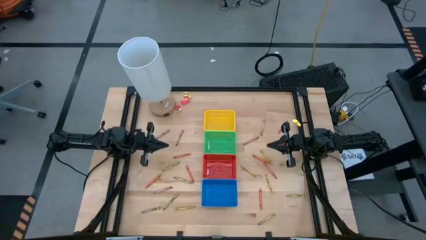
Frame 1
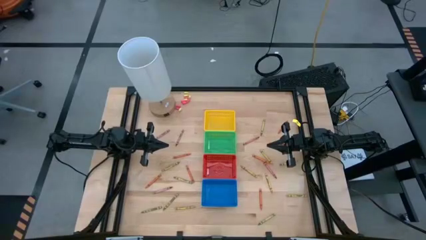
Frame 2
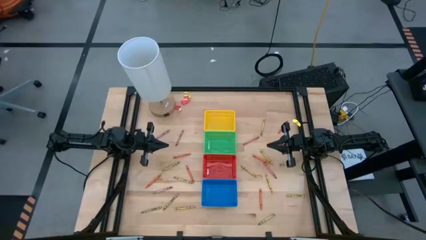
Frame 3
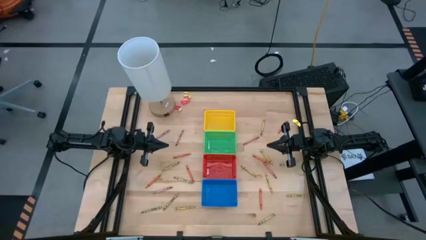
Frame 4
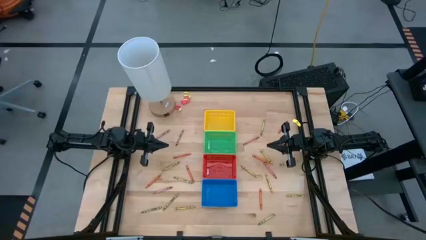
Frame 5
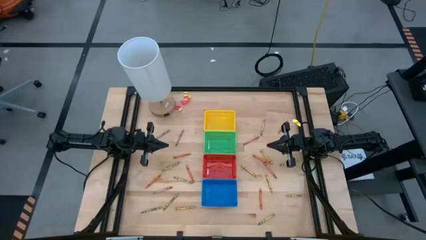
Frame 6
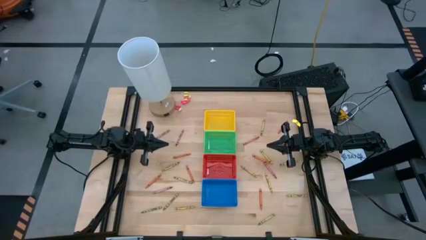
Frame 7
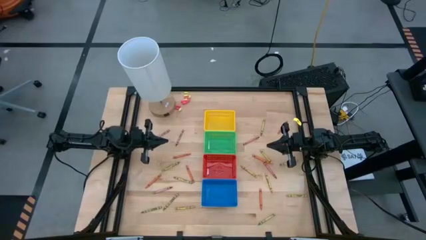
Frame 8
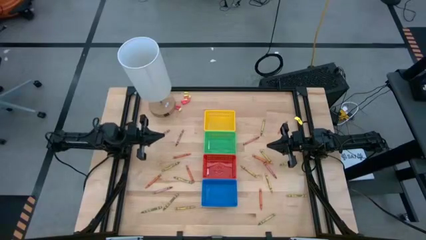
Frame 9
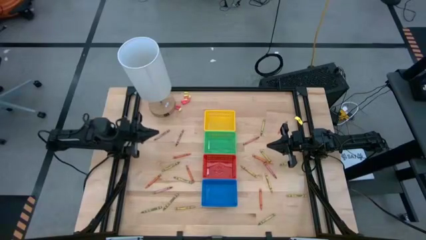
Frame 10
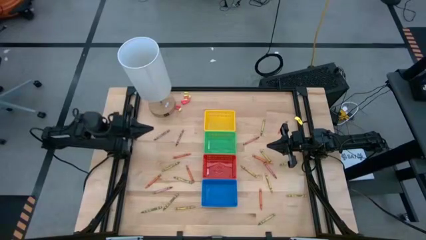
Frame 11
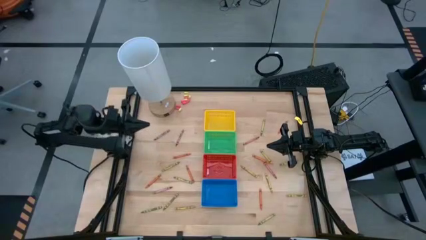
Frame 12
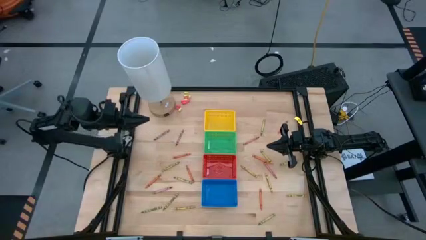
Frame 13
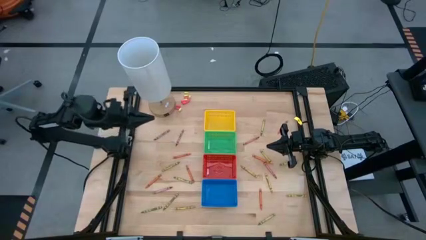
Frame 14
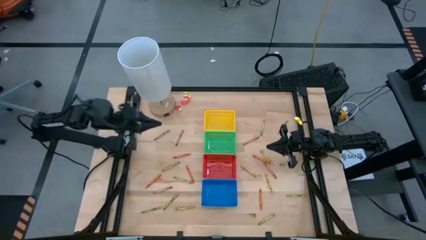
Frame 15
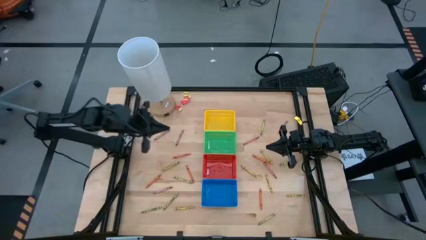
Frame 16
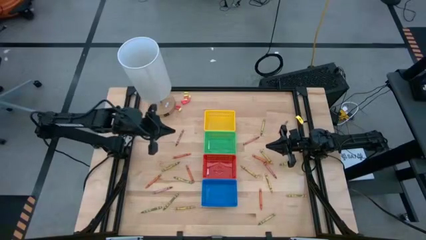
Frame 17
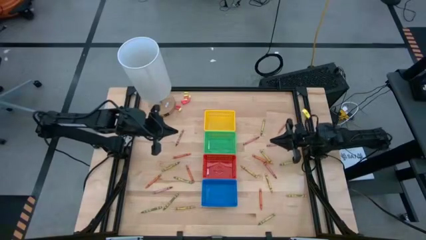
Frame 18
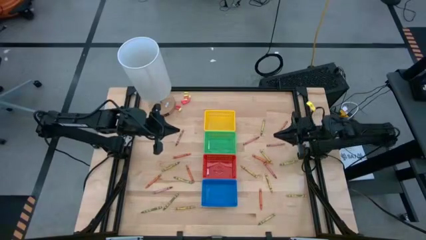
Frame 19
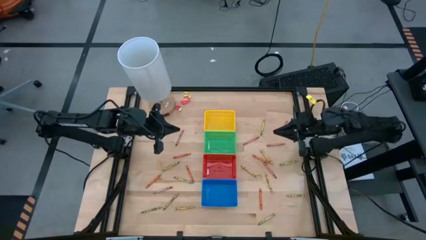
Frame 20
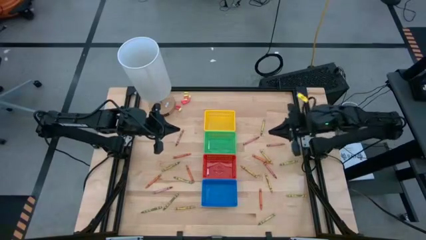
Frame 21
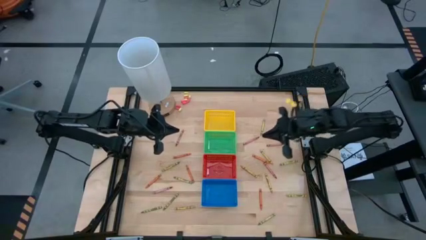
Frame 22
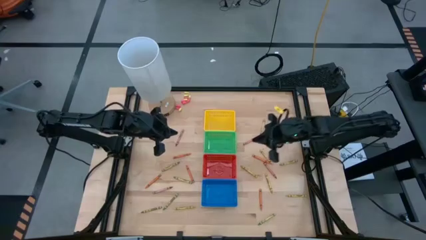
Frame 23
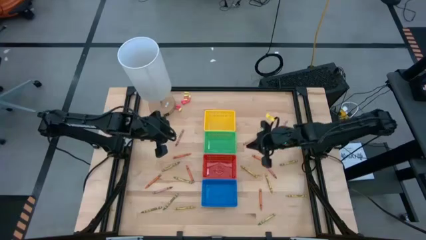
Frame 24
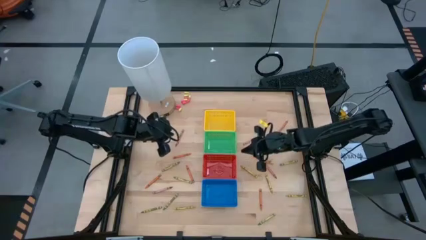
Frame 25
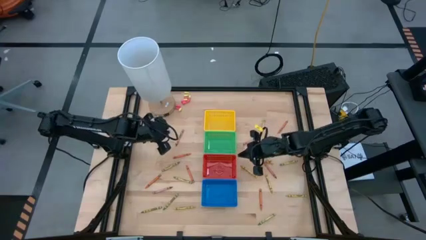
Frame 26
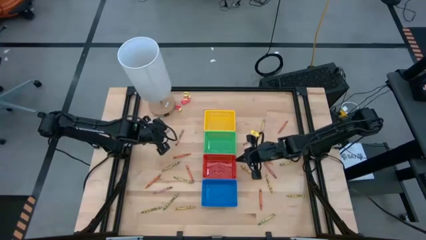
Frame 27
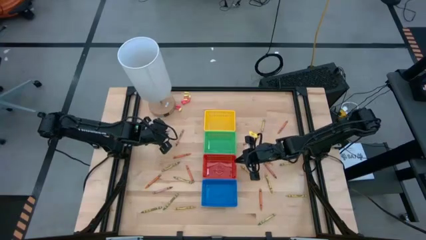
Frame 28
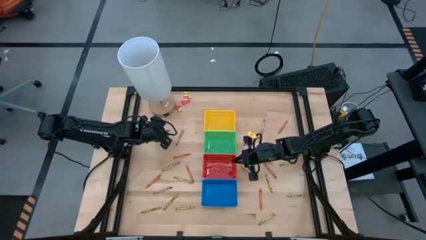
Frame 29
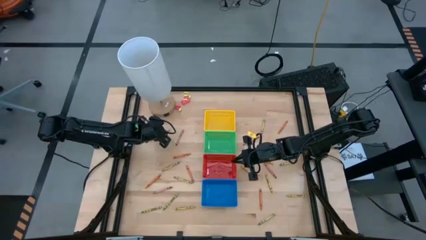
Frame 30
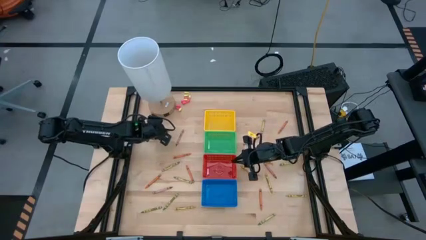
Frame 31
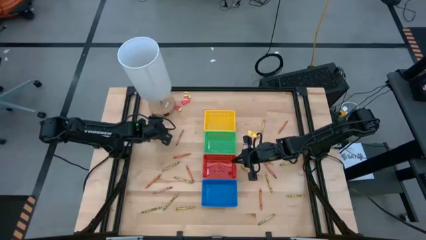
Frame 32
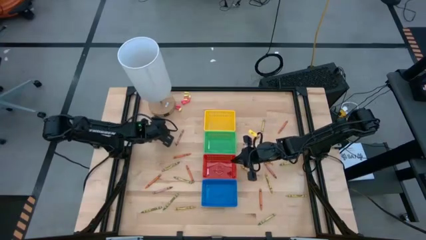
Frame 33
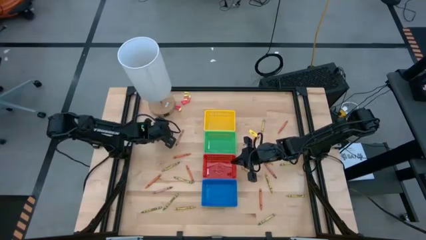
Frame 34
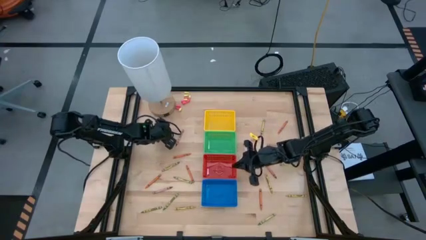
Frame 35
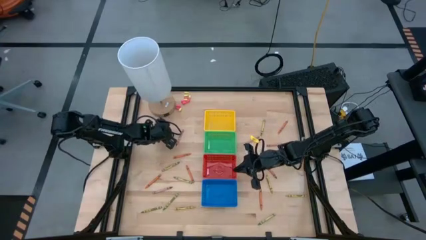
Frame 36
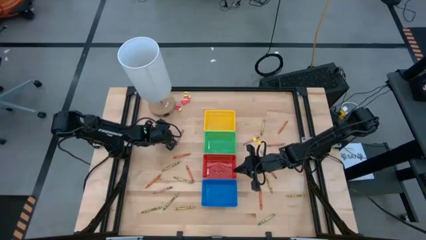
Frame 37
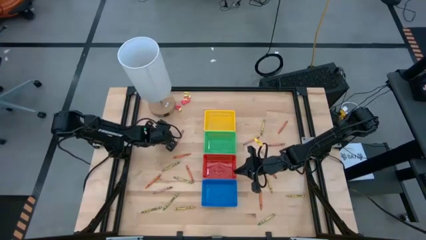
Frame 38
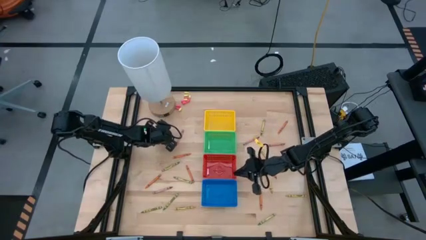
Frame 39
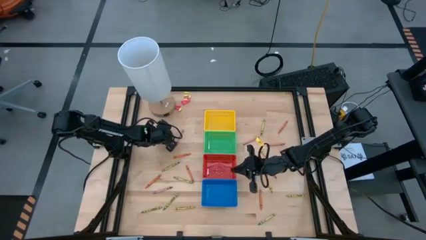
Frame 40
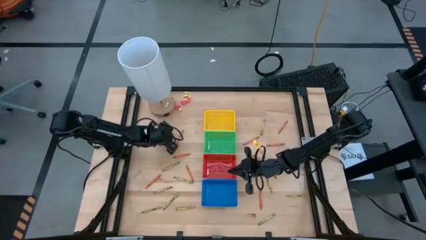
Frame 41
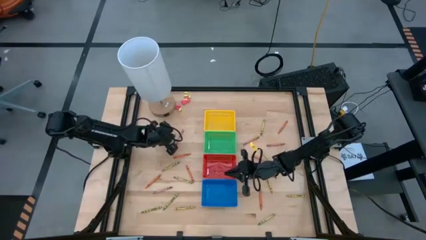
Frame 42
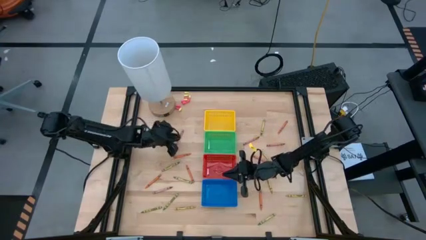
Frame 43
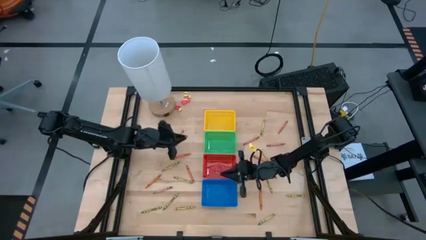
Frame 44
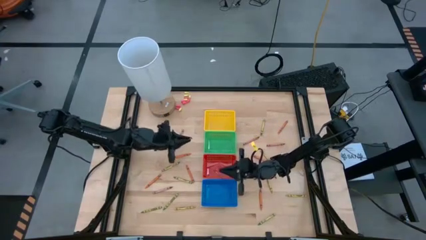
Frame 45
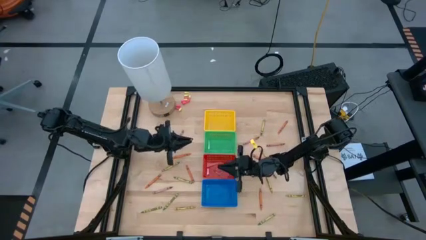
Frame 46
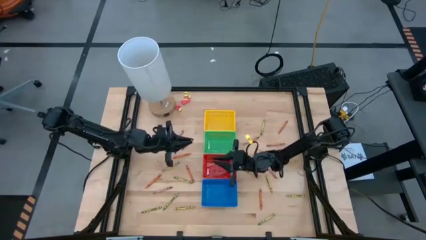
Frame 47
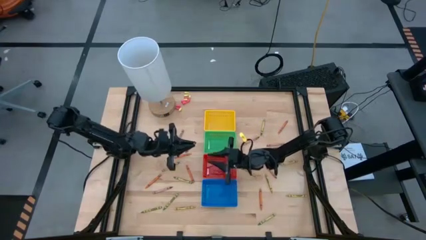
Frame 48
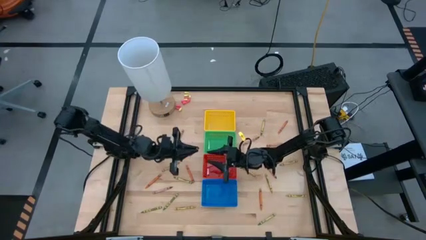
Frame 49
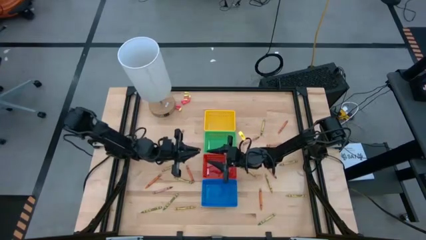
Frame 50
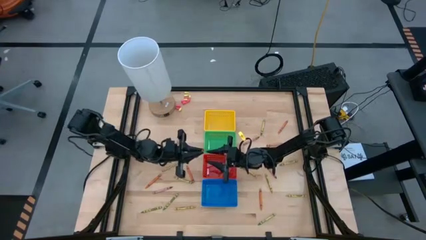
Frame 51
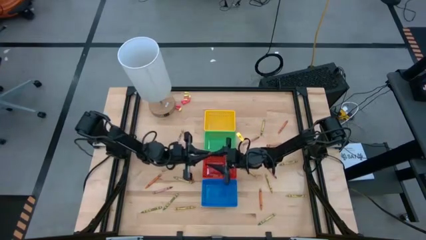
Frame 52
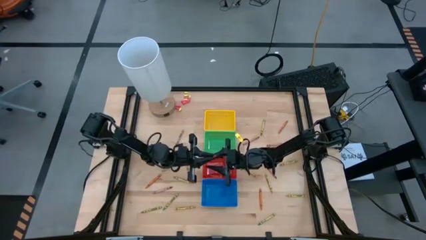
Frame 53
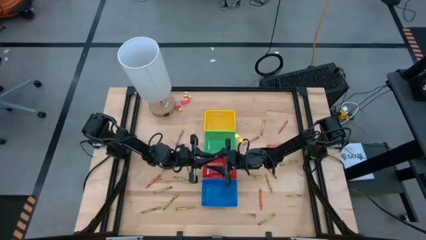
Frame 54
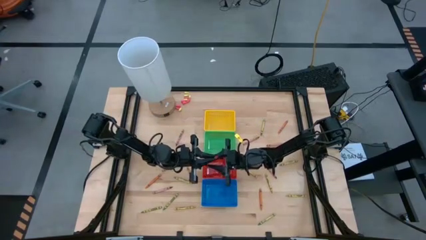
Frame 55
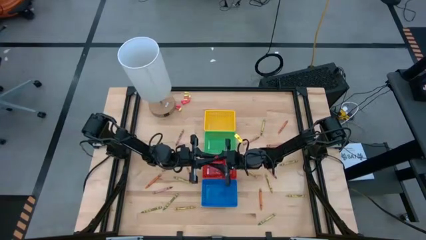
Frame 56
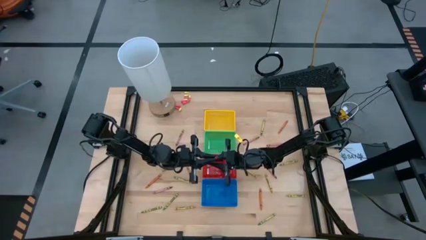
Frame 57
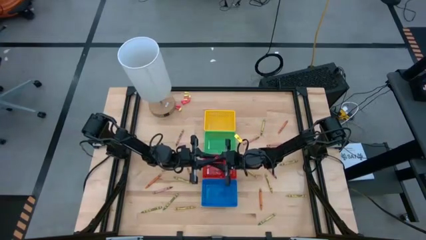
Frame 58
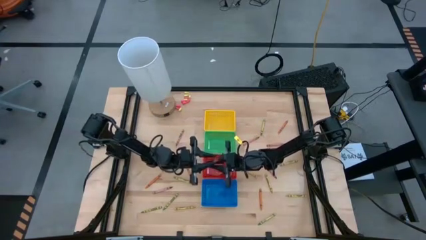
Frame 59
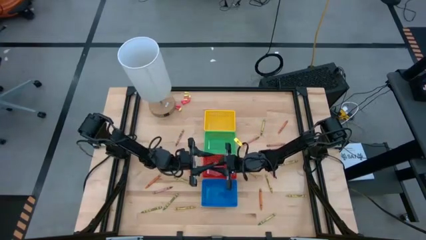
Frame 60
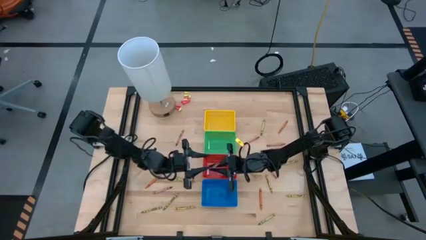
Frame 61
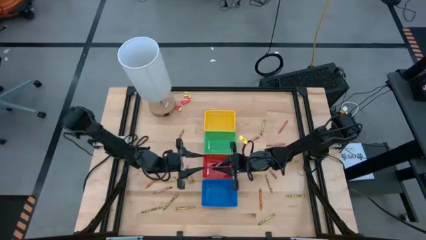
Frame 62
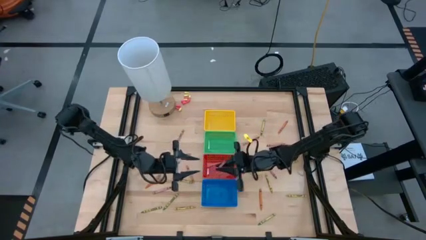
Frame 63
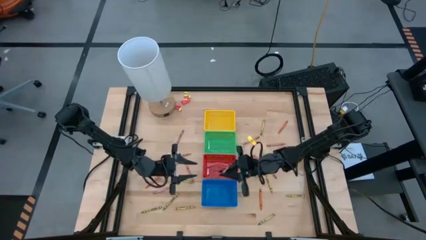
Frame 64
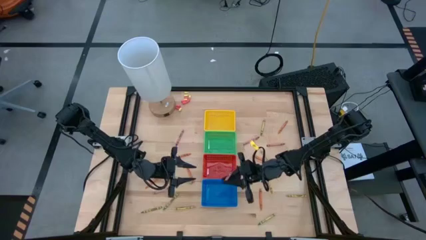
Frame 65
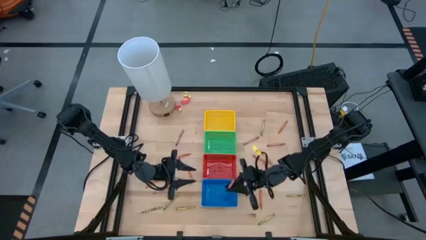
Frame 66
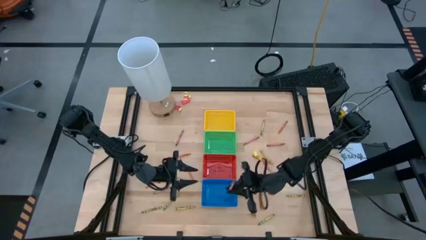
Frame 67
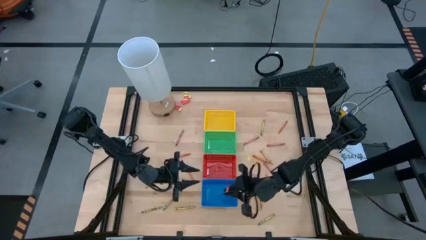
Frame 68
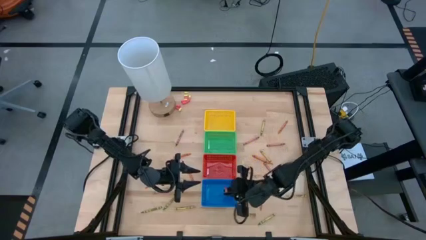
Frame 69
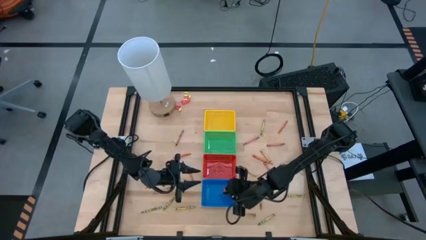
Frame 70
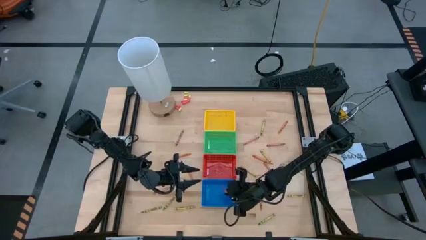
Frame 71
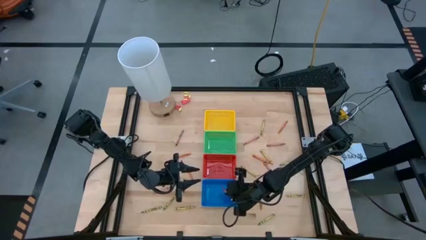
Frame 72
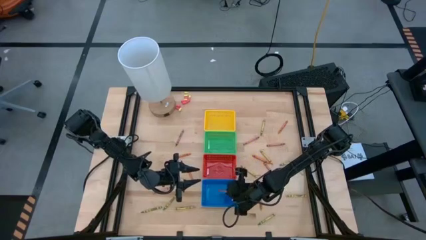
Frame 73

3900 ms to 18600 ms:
Task: Sort crayons
Put the red crayon into the blue bin
